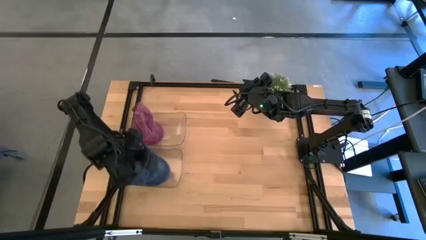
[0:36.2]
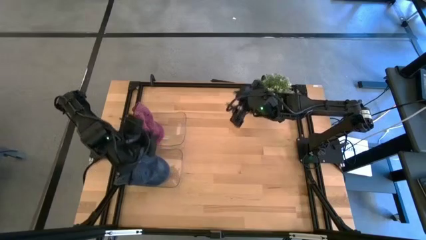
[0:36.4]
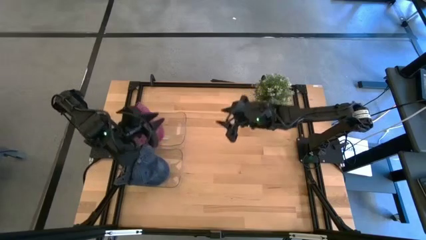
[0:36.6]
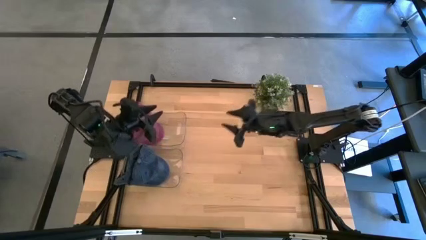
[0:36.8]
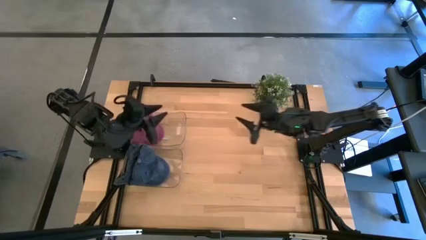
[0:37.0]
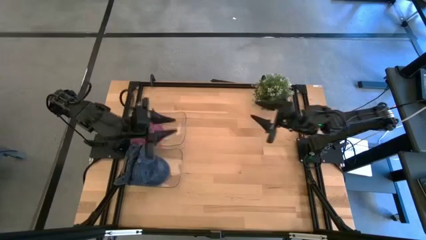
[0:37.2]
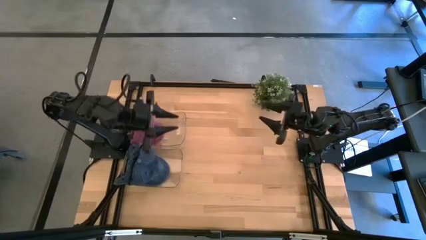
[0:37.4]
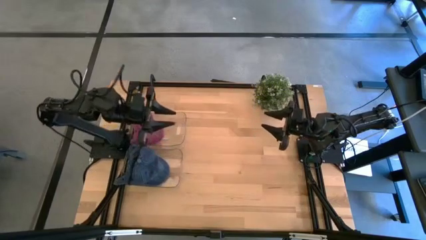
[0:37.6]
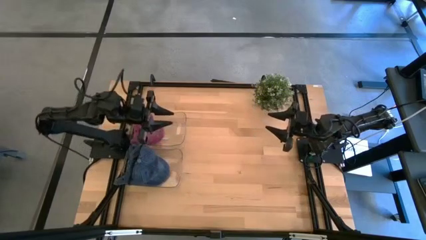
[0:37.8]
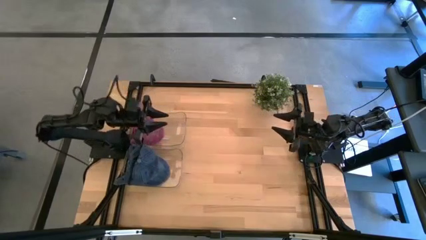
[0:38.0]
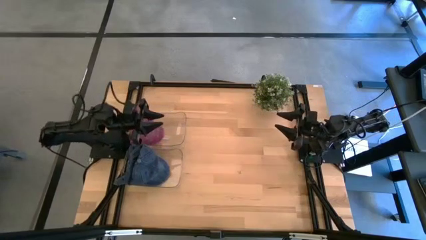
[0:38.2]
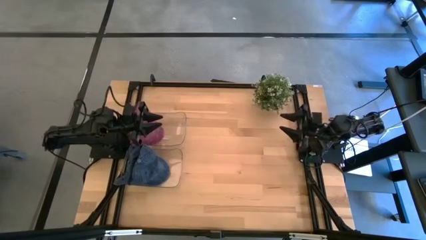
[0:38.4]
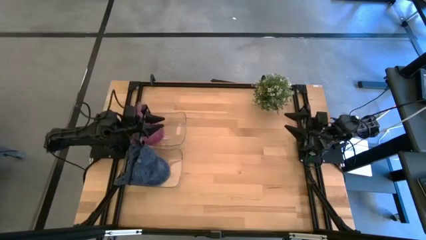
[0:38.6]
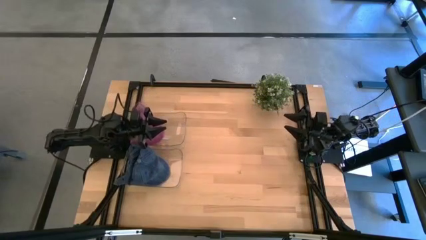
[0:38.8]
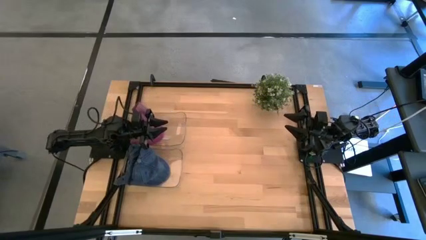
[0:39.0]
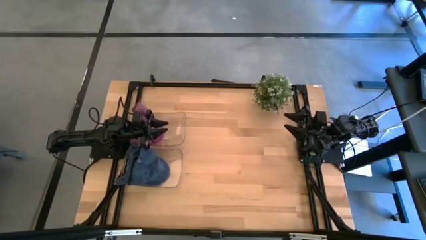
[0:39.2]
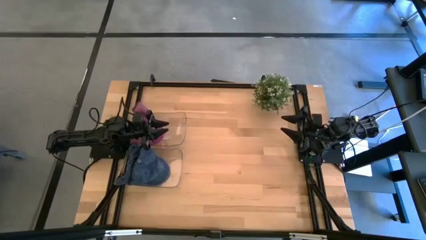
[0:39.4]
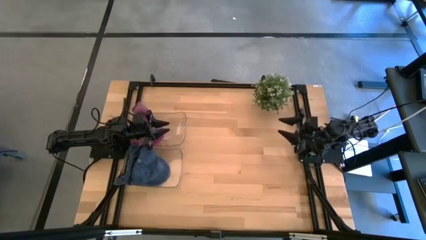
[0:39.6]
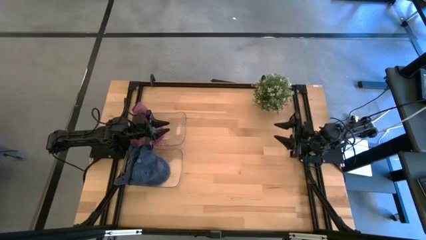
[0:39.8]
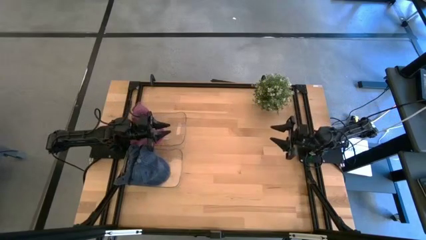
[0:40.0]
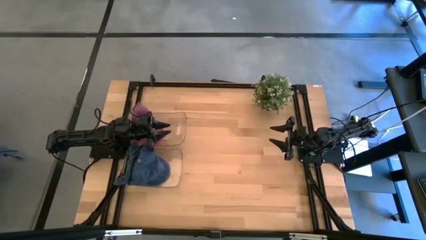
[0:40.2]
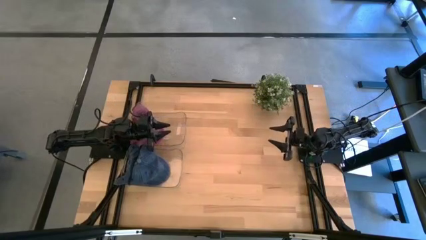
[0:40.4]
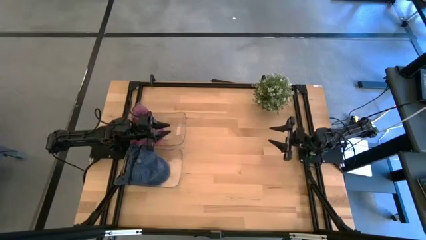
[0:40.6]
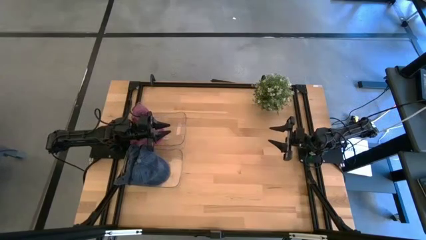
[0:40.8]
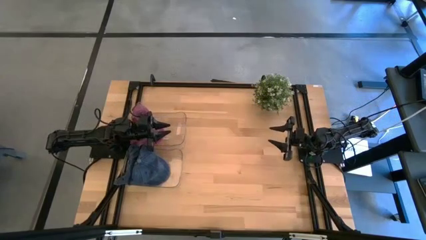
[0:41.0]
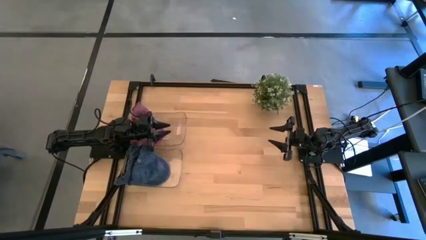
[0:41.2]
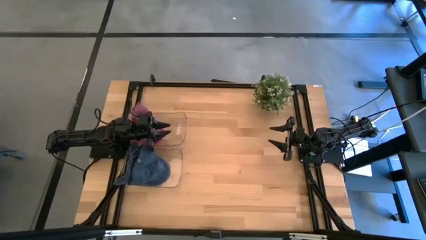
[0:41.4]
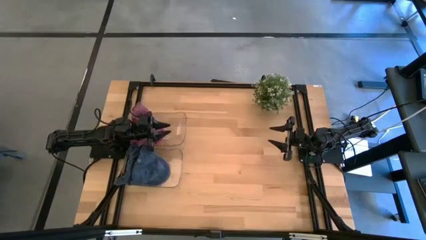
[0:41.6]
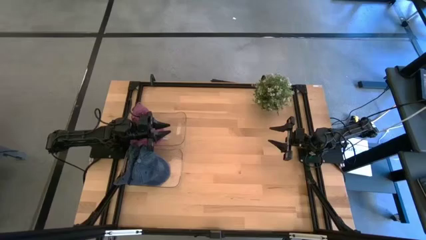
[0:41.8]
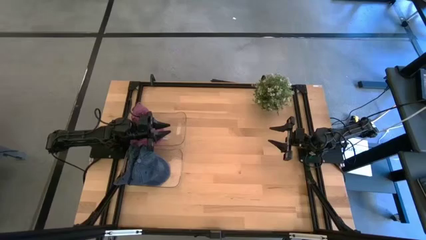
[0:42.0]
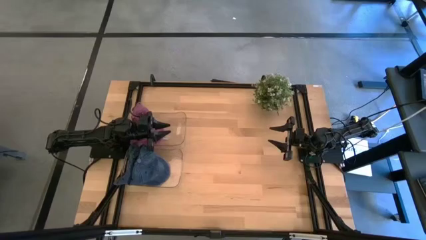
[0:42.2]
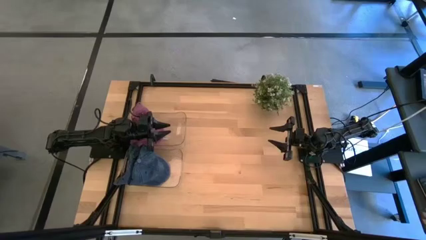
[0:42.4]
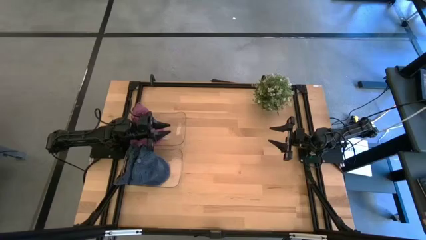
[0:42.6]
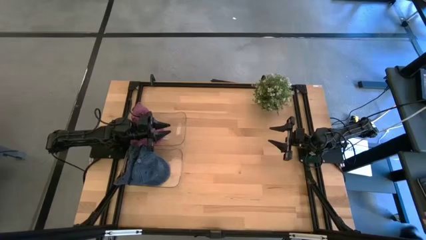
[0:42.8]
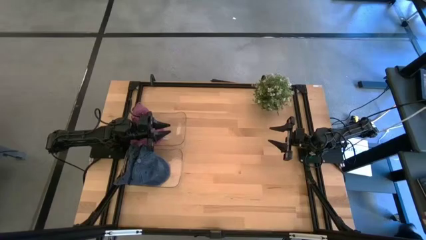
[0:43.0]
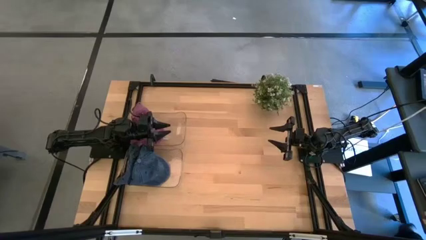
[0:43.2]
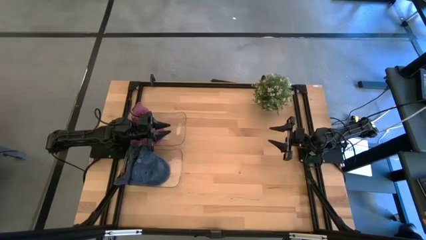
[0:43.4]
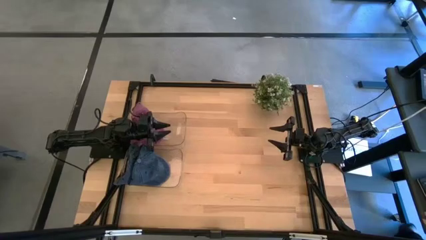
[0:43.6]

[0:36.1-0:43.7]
Task: Pick & Place hat
Return to Home Position

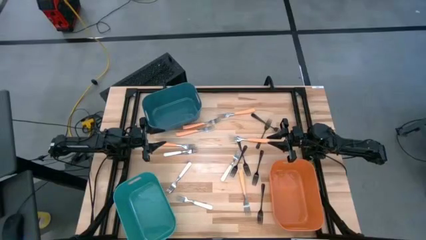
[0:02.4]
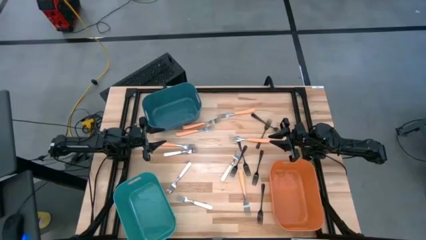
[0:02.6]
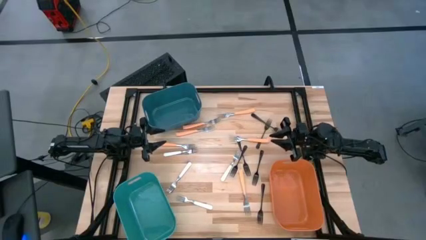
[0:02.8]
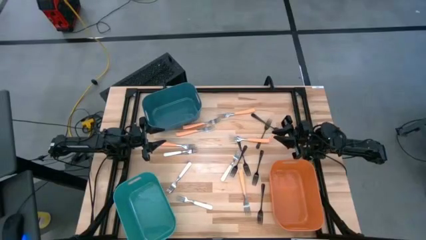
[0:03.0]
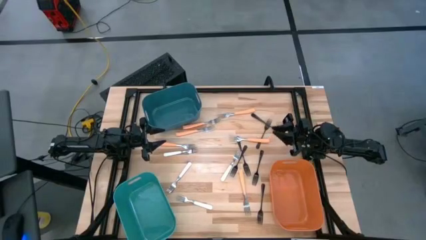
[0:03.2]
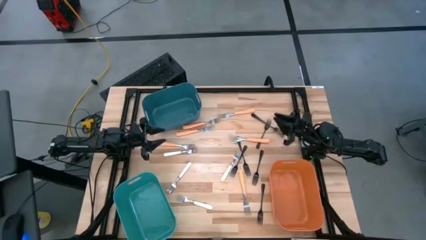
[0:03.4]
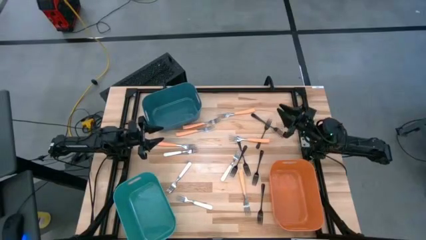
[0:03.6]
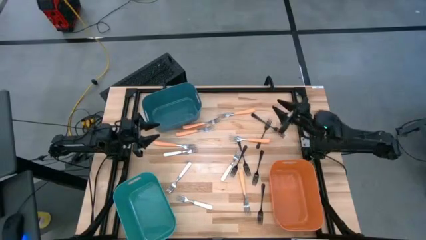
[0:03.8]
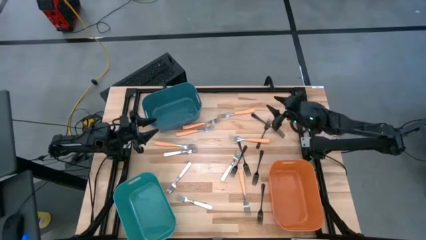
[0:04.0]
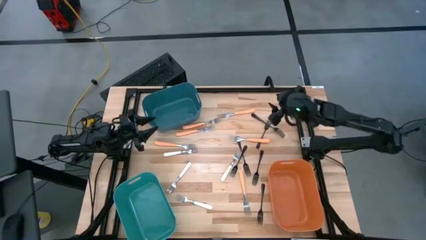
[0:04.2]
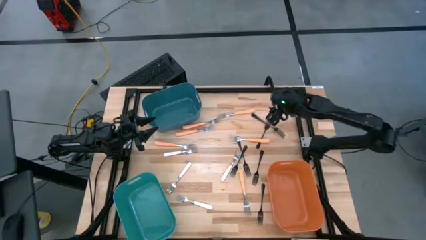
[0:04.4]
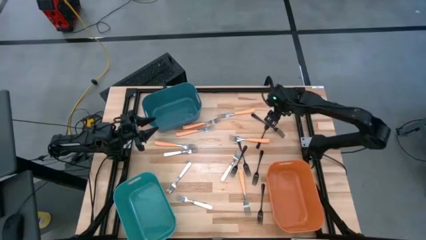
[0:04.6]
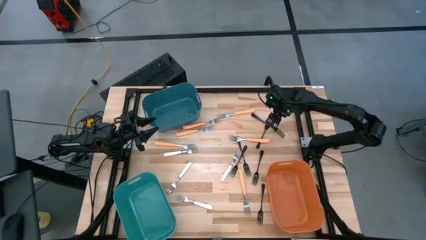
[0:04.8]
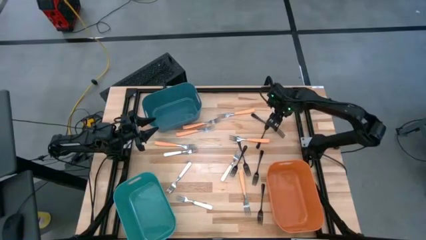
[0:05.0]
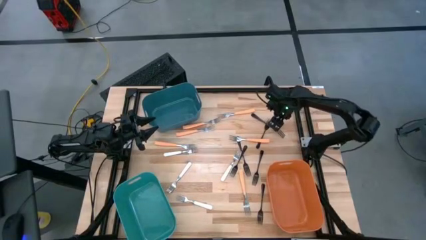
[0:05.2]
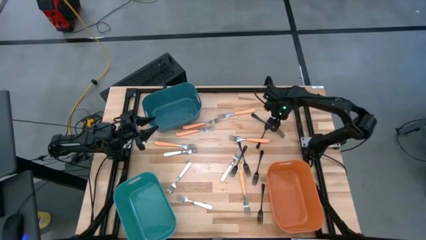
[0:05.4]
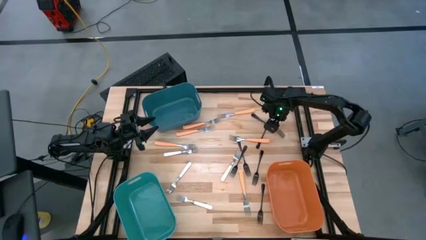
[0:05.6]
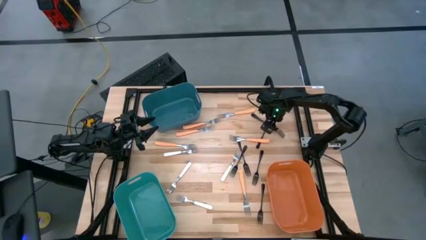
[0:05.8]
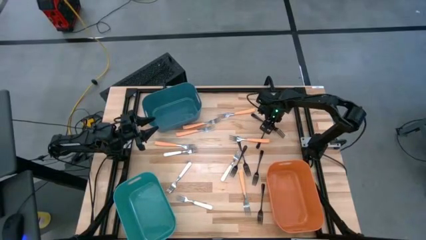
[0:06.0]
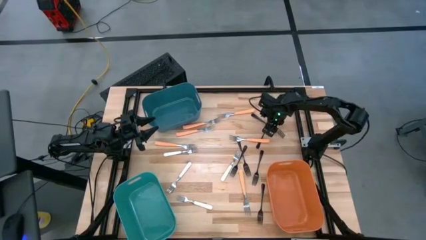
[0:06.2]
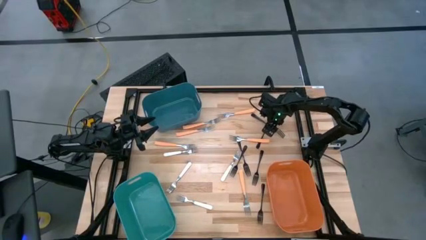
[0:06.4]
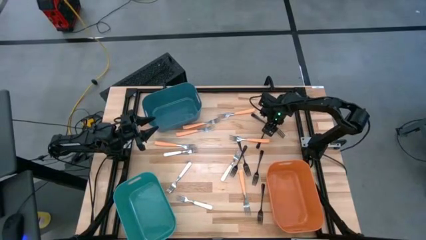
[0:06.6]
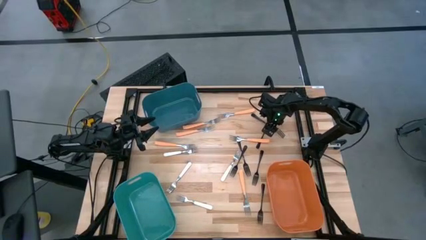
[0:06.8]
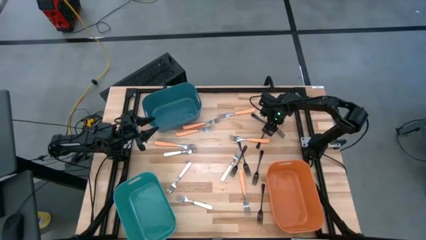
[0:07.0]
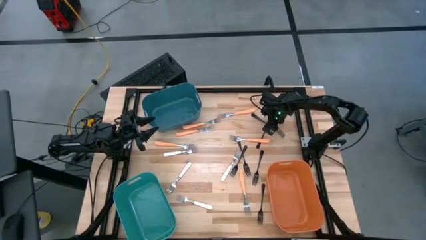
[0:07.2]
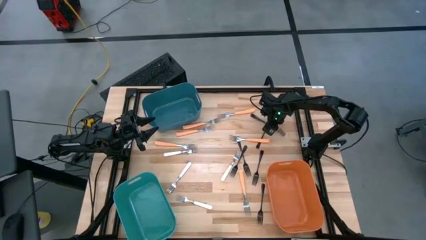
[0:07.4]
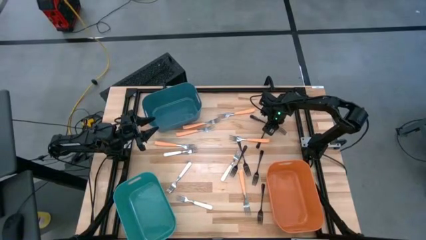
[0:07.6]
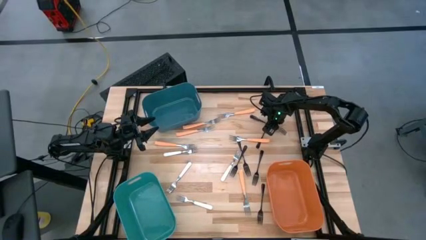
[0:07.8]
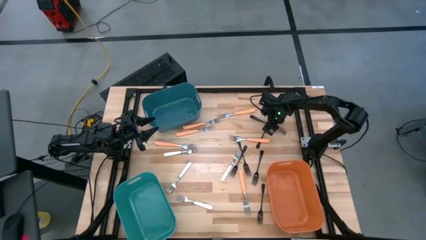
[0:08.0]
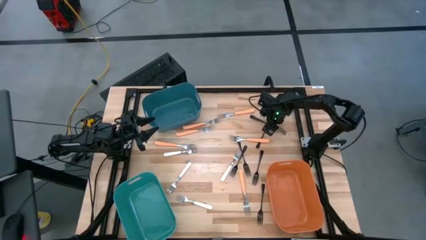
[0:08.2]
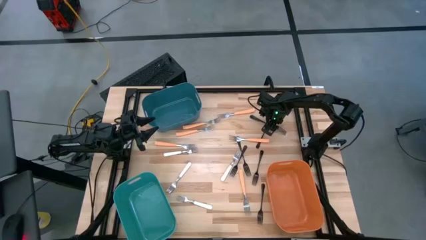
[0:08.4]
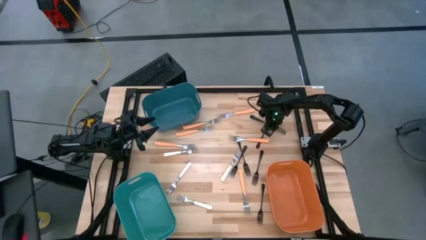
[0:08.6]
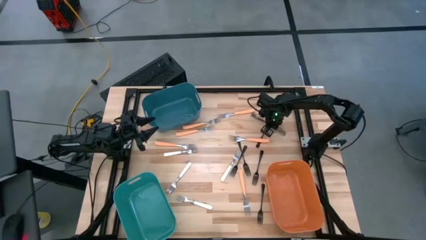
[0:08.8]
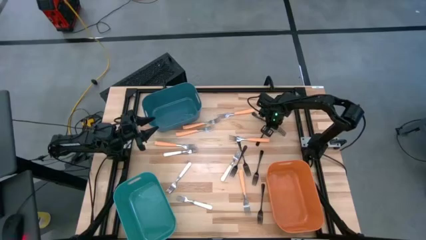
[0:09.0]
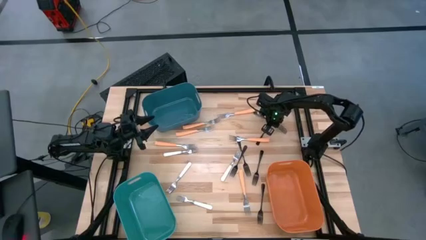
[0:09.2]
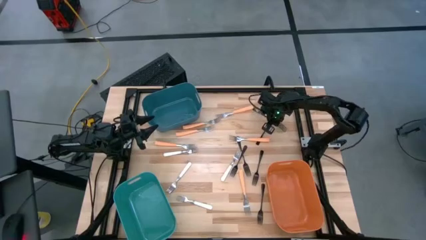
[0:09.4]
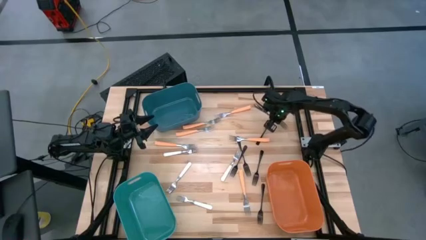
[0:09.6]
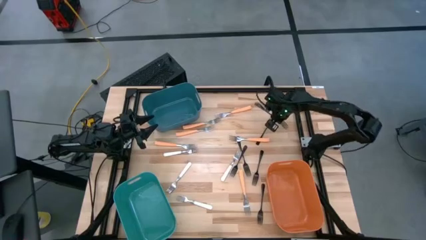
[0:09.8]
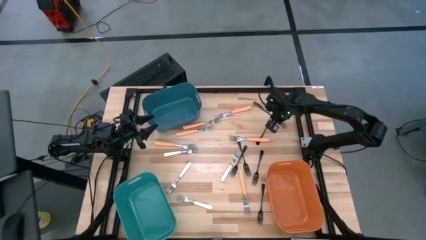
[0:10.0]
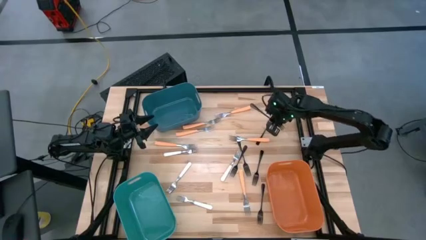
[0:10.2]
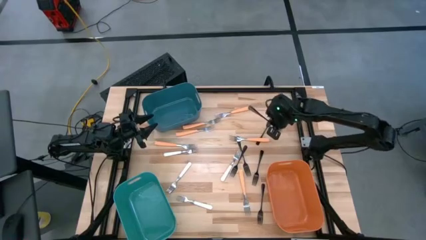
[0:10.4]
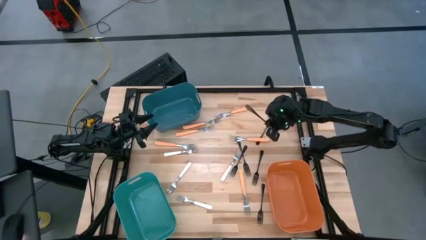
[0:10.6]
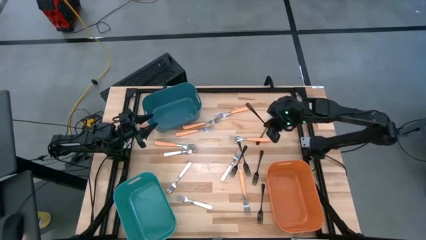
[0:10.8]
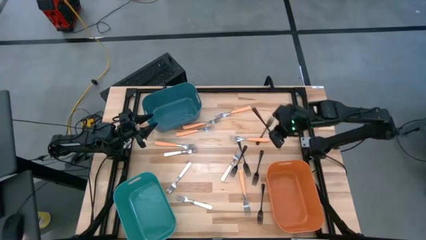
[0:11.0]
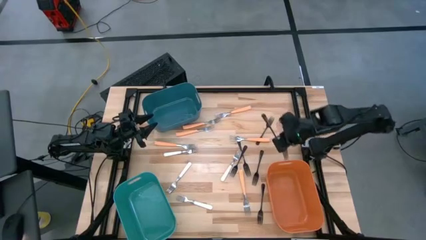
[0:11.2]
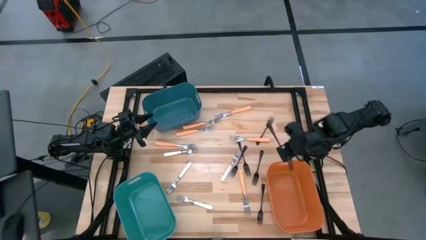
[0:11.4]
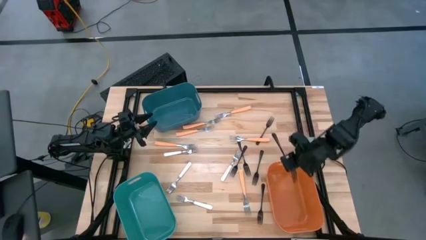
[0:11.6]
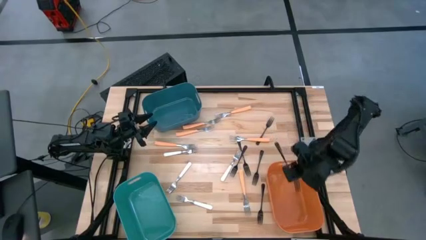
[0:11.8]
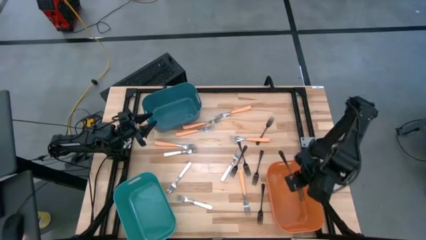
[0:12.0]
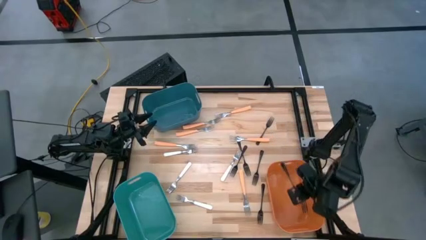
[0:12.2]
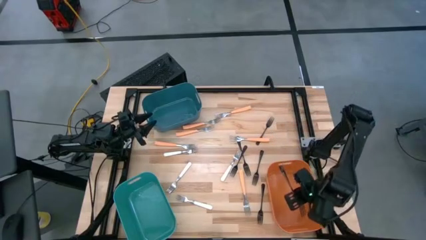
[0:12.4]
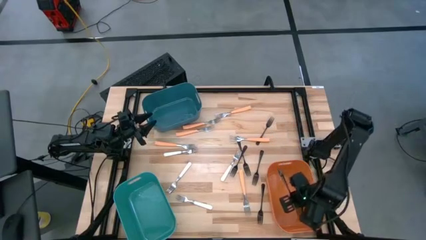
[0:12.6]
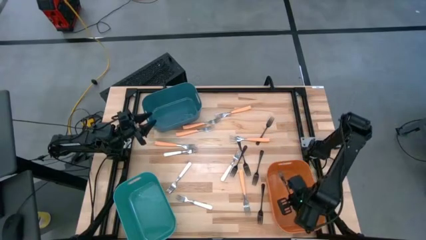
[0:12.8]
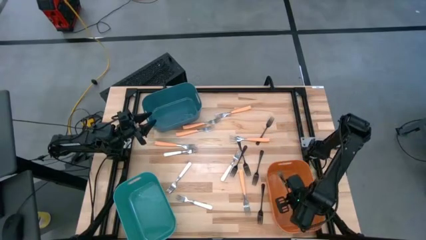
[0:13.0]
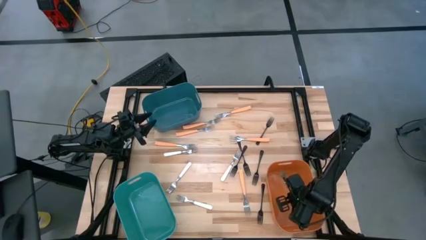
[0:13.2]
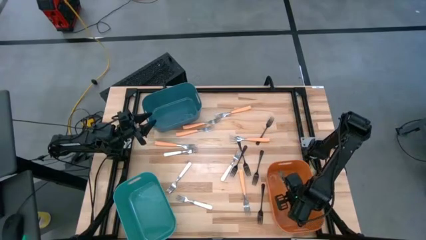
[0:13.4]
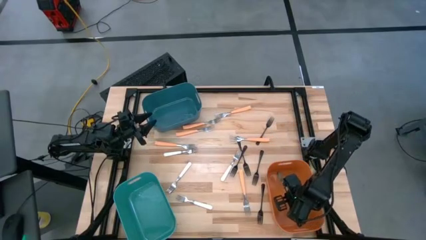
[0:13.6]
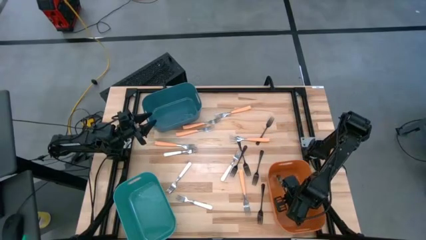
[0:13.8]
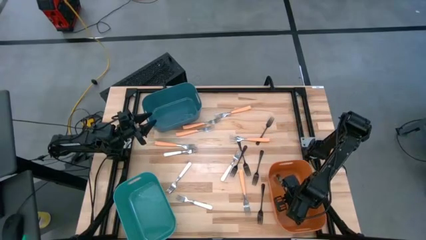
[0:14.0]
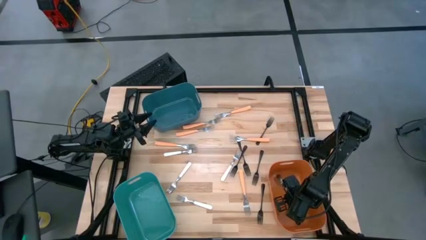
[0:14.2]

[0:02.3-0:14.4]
Task: Sort silverware by color (type)
Put the black fork into the orange bin
